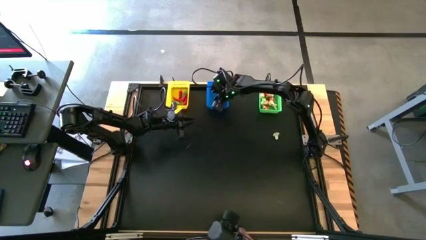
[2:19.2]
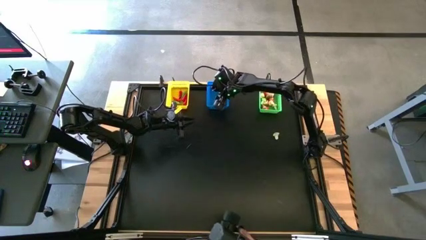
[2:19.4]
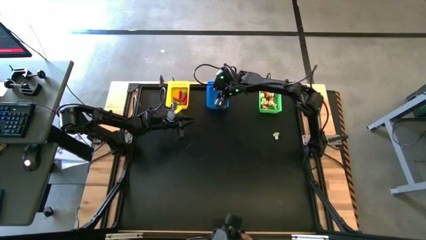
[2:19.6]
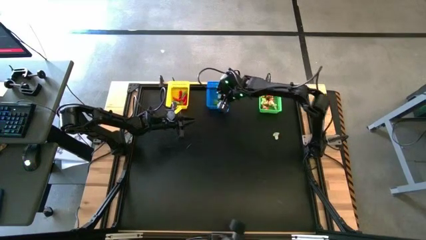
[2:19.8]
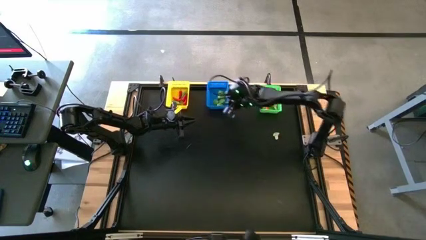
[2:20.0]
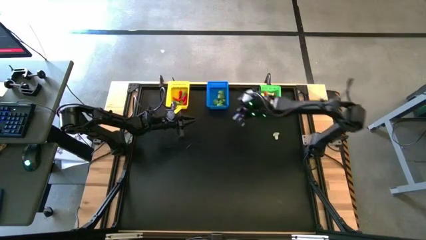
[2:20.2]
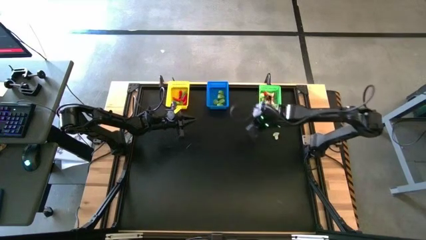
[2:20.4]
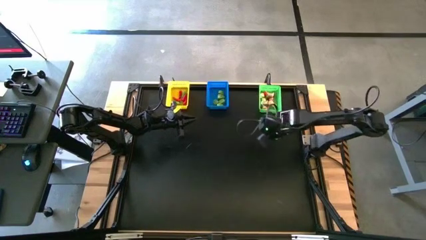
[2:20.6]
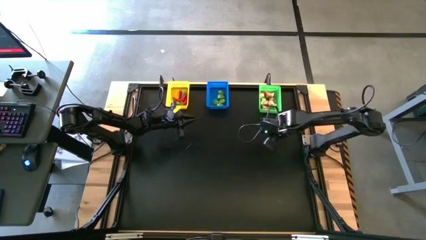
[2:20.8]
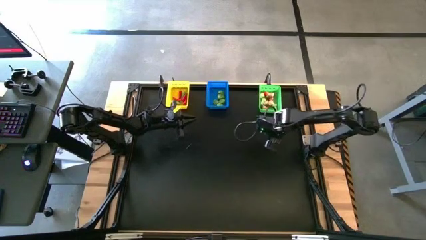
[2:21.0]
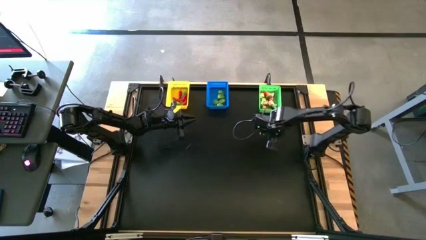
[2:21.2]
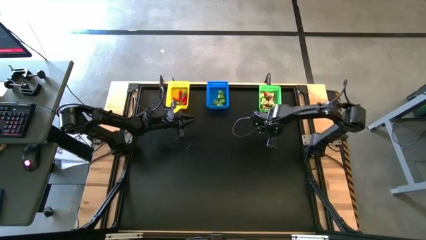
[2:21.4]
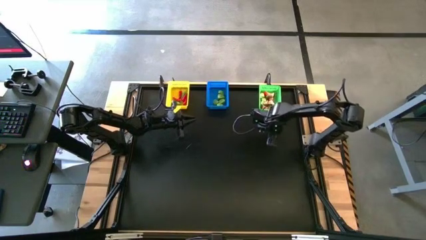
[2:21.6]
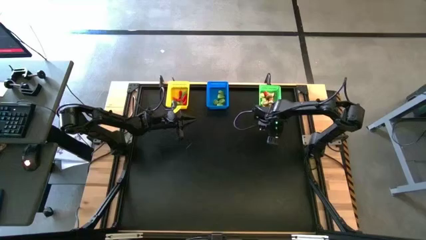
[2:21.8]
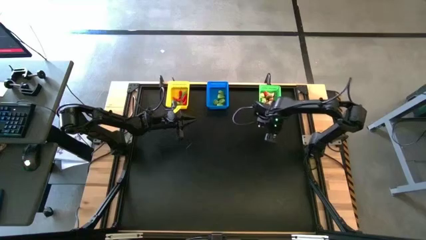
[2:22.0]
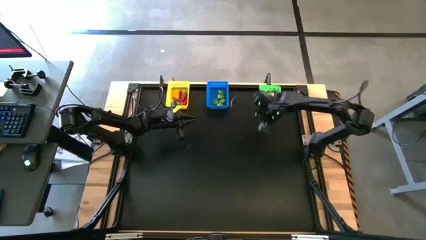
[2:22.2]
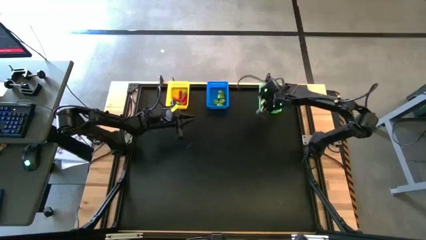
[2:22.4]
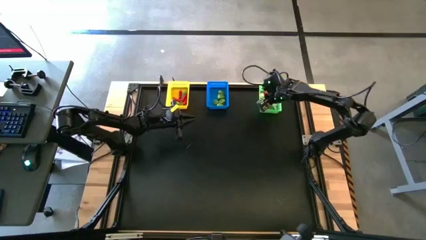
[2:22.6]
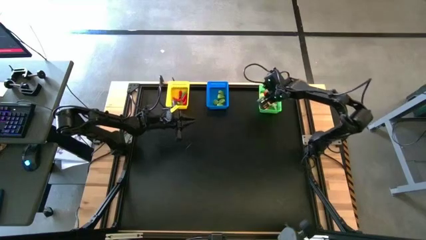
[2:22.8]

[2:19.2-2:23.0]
Task: Sort produce into baskets
Put the green mushroom into the green bin

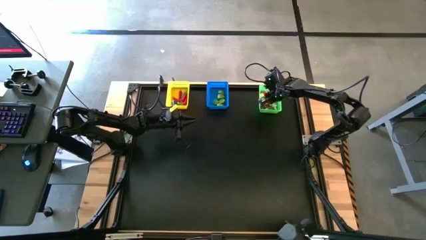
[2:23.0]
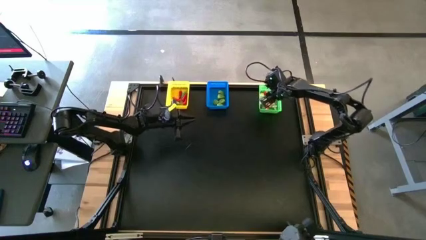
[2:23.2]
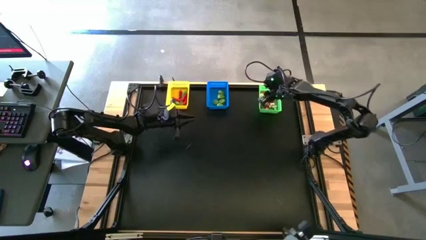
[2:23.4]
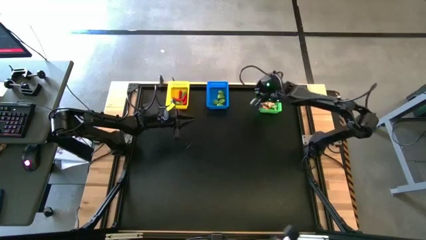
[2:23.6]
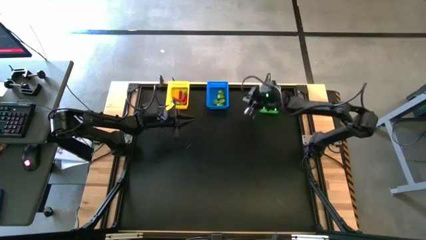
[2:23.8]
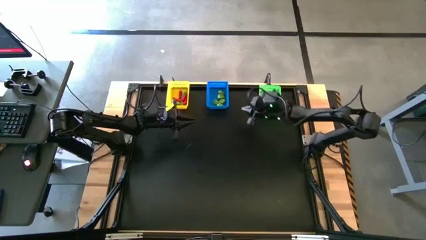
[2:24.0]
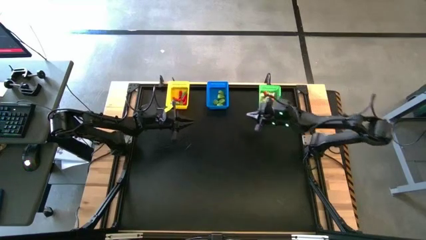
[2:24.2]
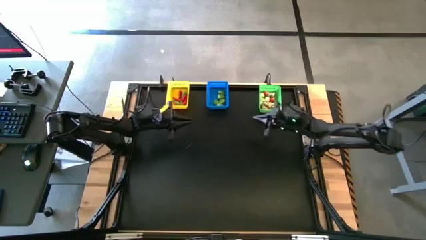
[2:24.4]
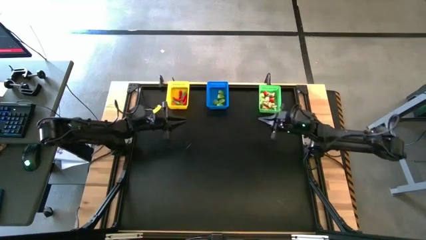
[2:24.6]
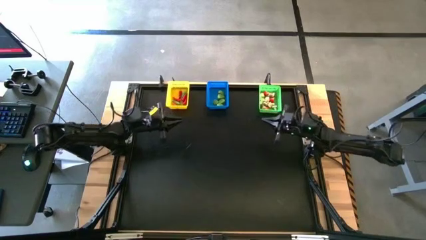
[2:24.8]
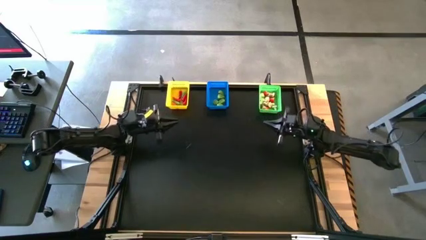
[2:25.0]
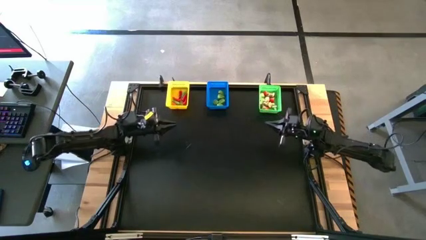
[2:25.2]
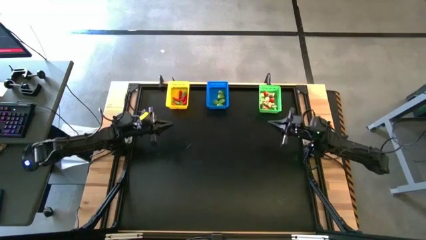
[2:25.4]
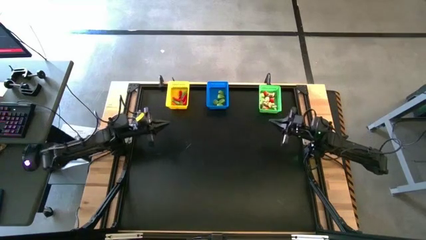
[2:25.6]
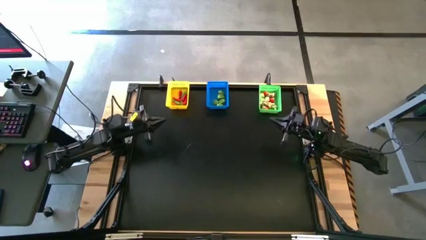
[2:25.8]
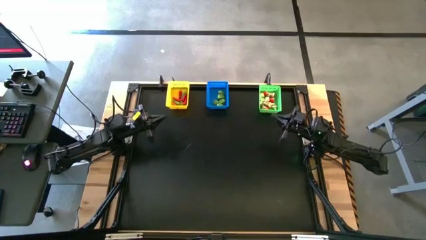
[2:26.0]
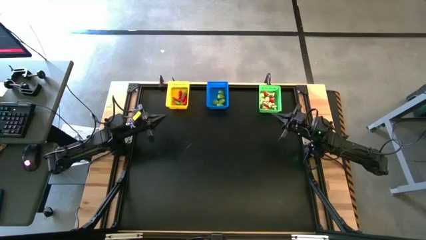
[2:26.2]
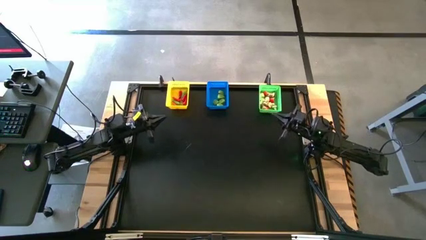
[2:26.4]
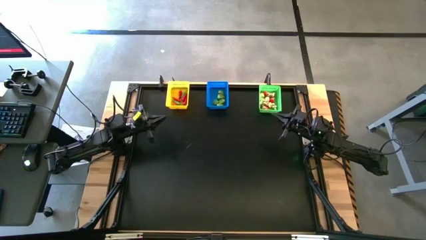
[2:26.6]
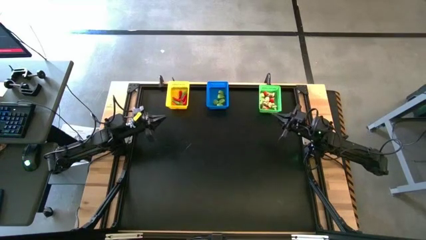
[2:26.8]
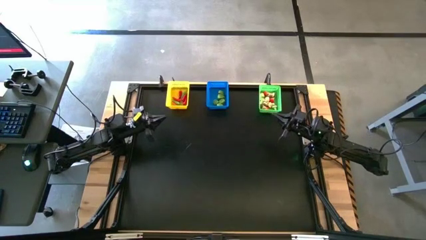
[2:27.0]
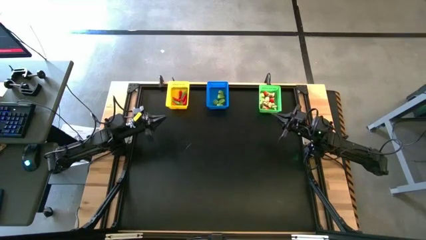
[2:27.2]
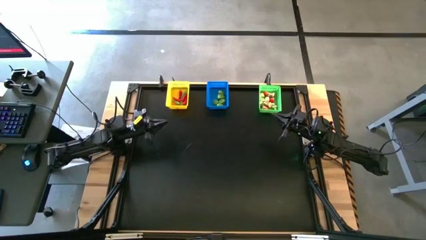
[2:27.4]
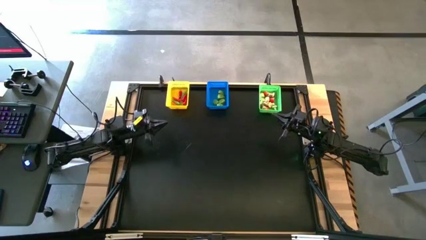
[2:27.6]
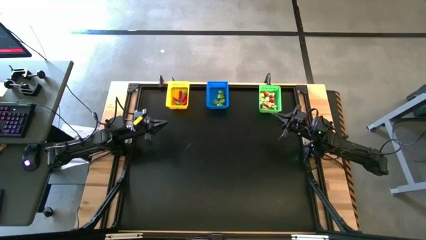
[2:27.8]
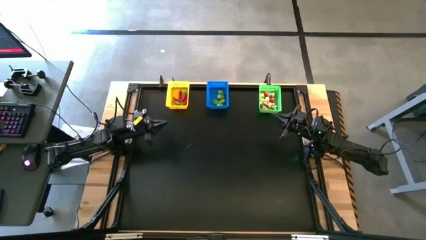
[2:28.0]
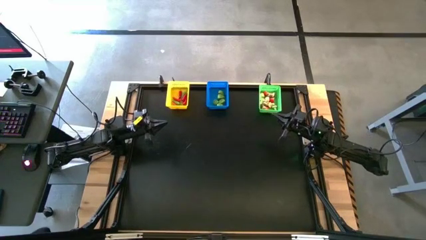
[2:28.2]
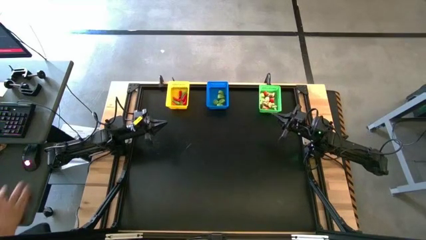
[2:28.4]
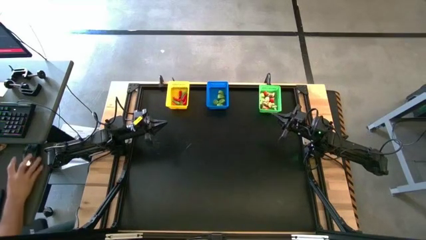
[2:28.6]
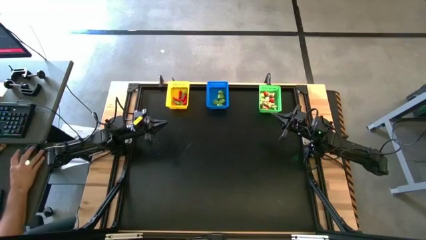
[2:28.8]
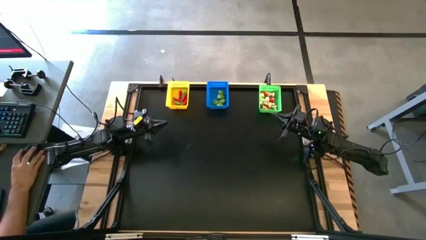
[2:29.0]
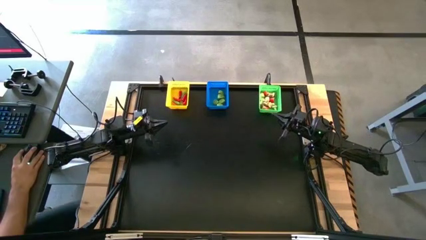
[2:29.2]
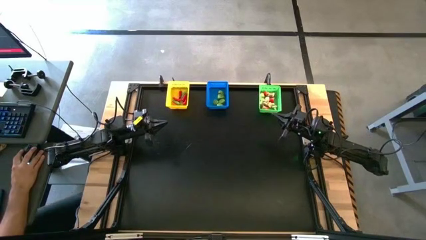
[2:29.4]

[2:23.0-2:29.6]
Return to Home Position

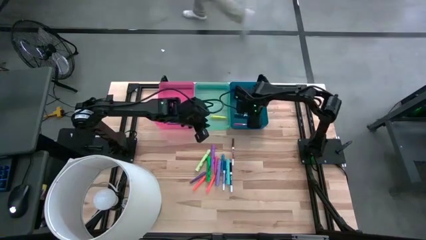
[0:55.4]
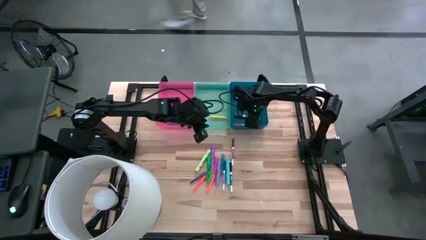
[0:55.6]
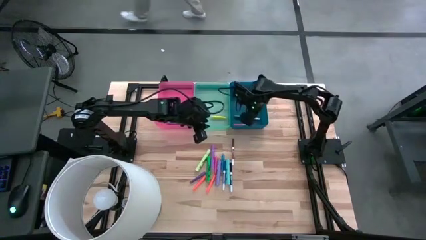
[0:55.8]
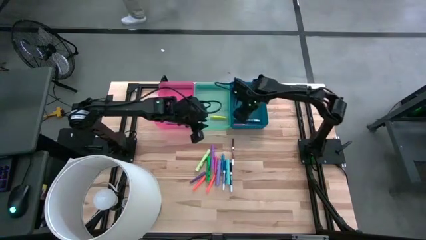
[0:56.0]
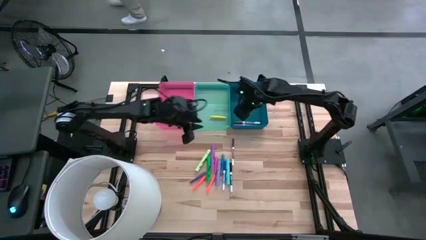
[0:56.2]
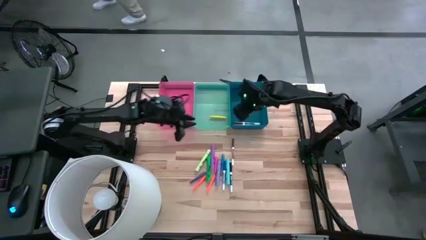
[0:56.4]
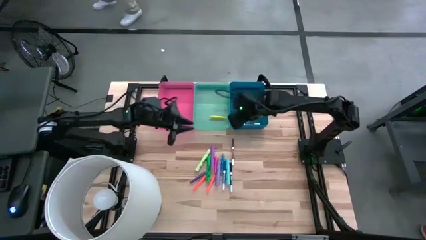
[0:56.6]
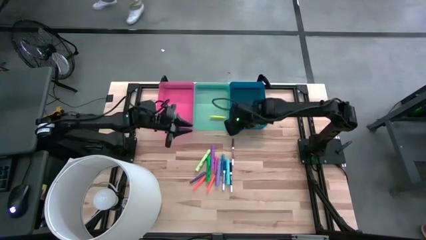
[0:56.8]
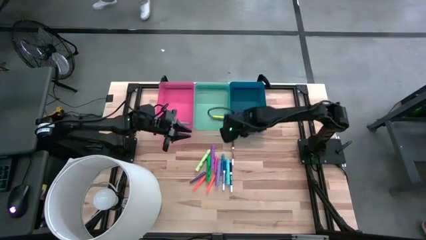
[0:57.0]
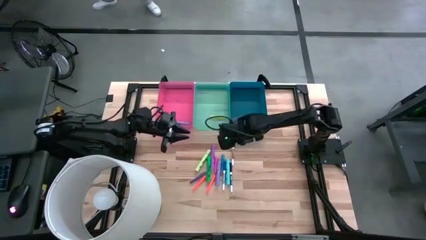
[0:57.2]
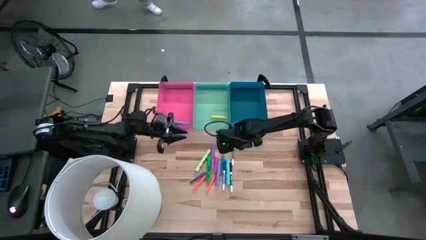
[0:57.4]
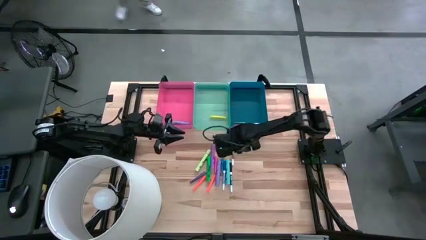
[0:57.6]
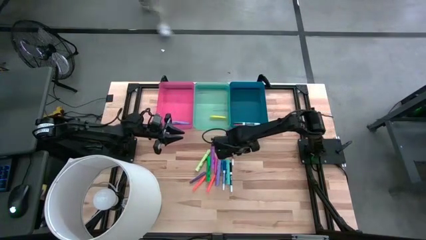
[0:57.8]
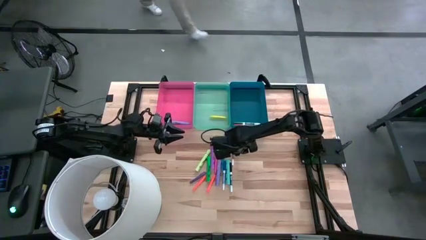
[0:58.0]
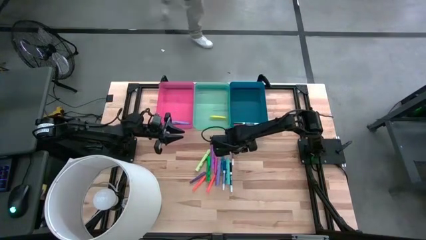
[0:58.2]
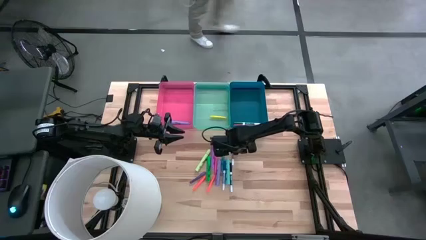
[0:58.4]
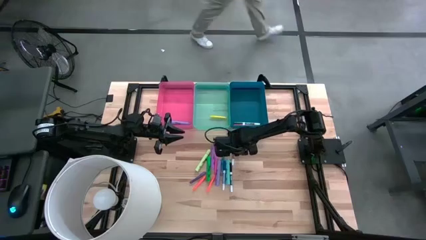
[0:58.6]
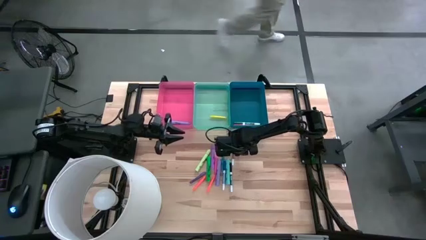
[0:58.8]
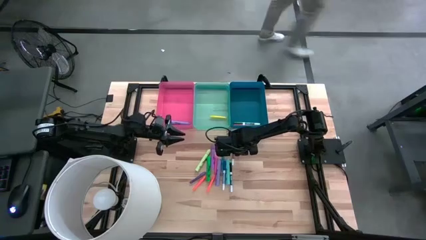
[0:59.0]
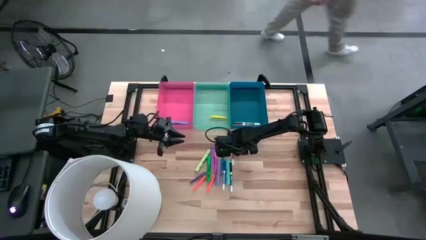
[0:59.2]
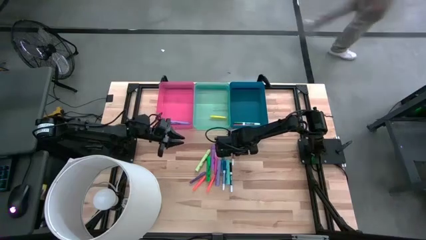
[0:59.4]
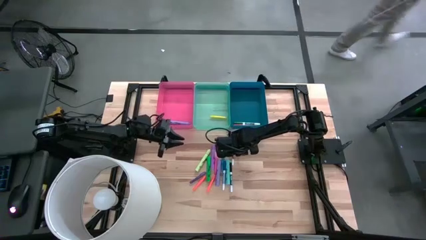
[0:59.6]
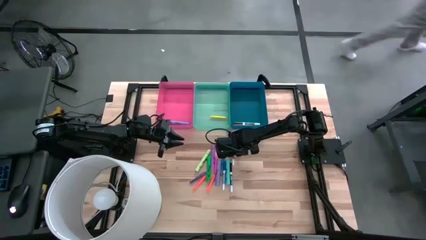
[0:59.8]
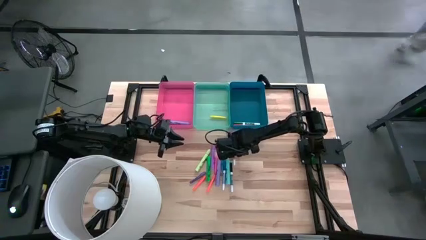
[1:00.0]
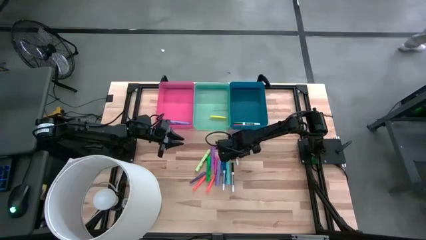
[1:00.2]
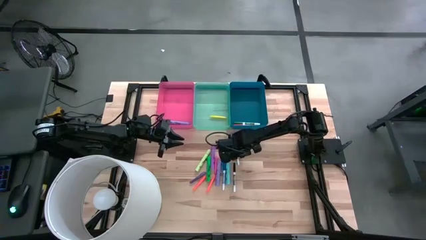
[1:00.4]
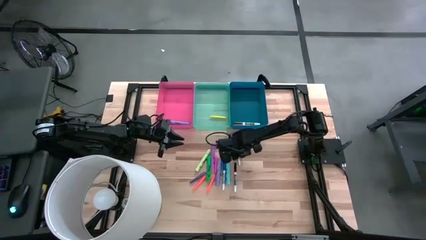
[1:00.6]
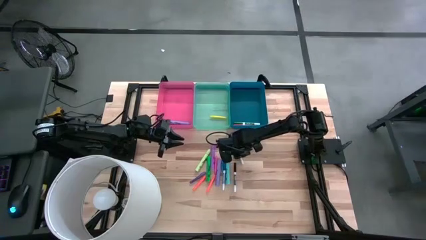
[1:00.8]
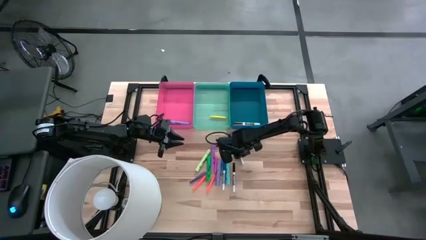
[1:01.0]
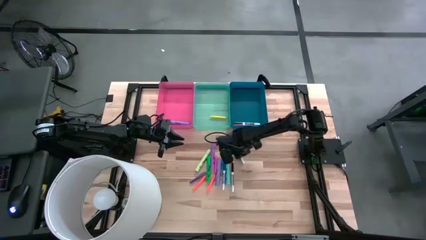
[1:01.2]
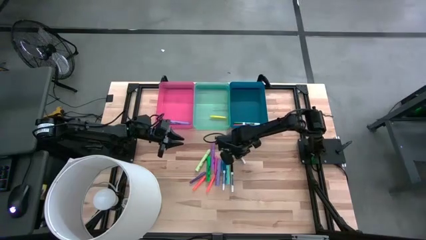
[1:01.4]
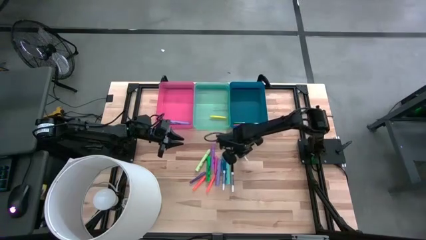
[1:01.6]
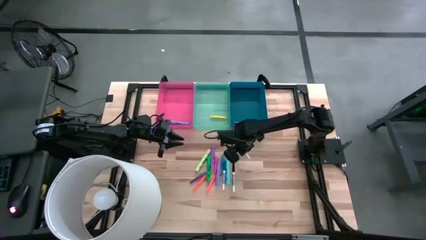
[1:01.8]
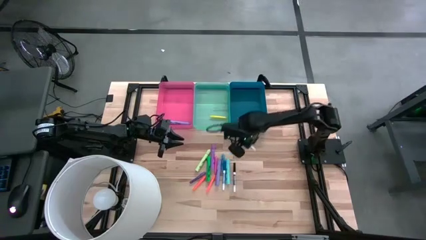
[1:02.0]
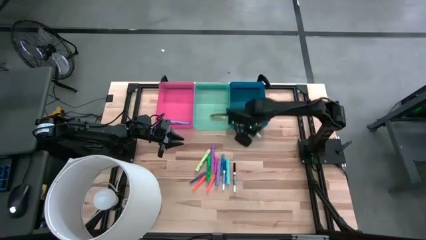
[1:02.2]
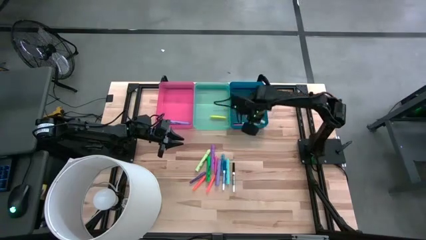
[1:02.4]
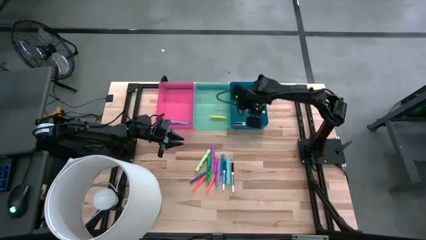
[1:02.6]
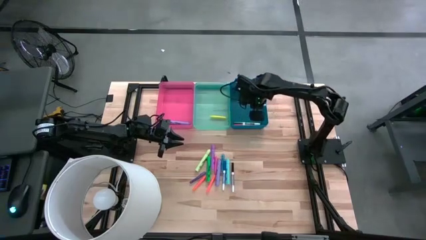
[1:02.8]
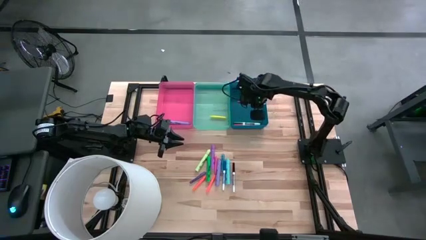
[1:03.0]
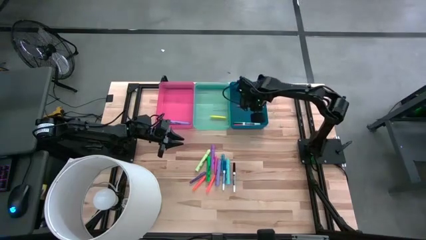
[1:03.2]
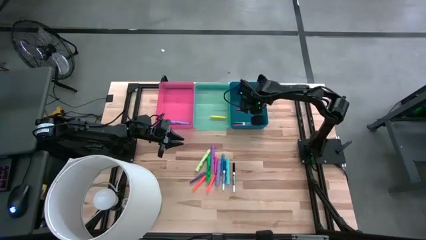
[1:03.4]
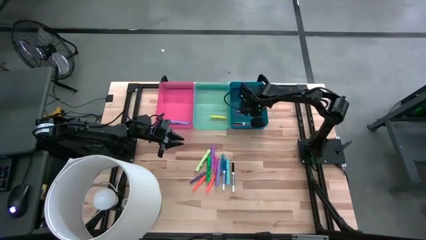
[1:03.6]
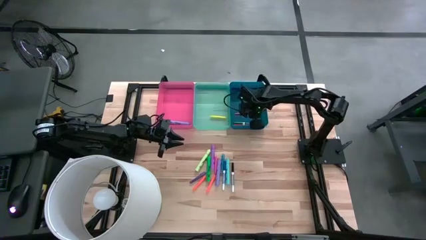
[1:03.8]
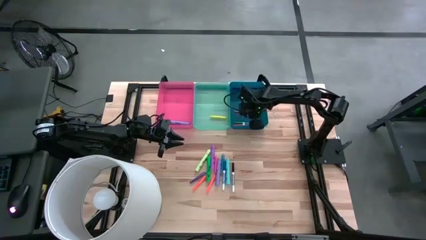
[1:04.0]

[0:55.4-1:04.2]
Task: Pick & Place Markers
Put the brown highlighter into the blue bin
